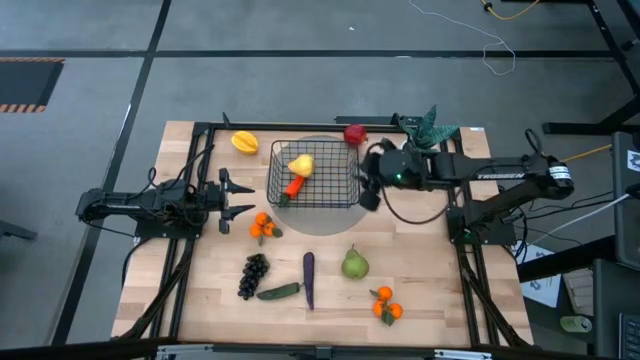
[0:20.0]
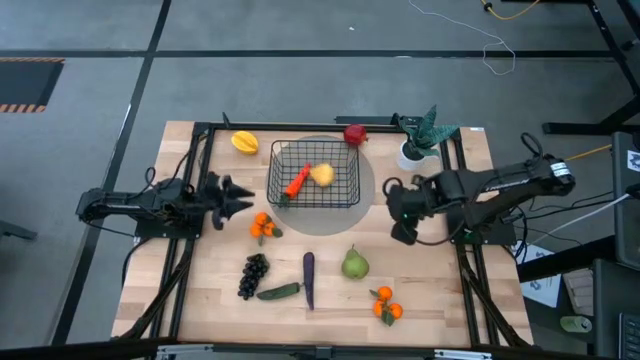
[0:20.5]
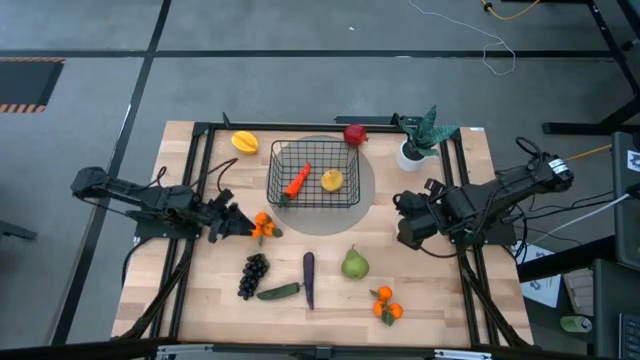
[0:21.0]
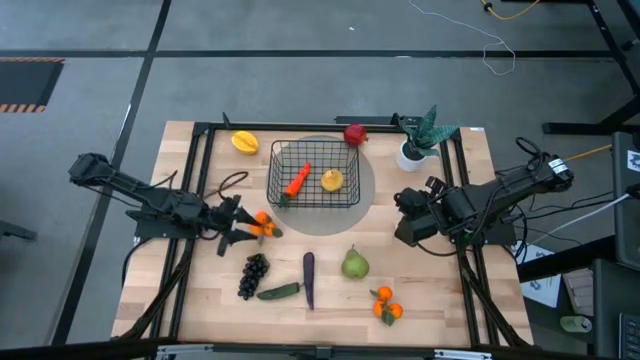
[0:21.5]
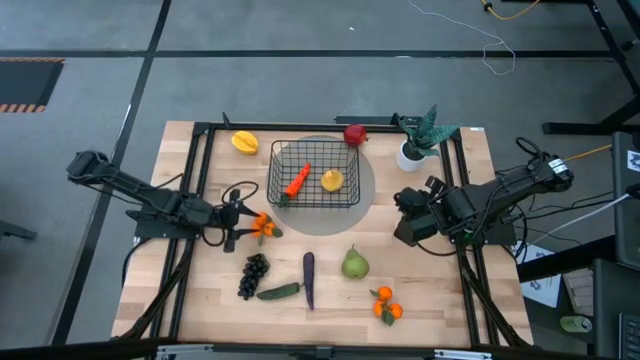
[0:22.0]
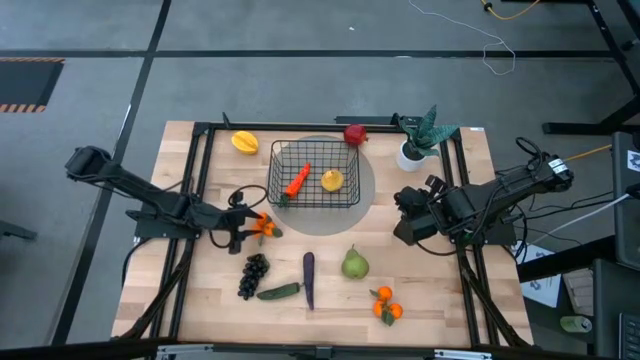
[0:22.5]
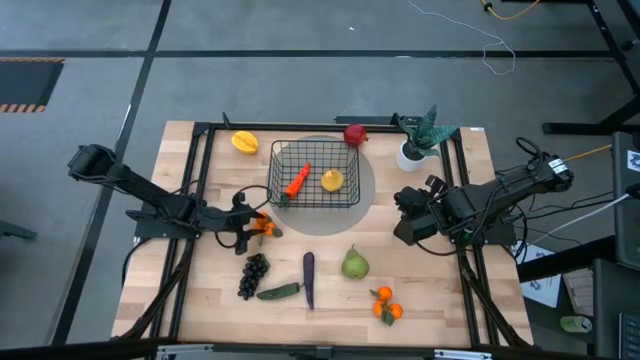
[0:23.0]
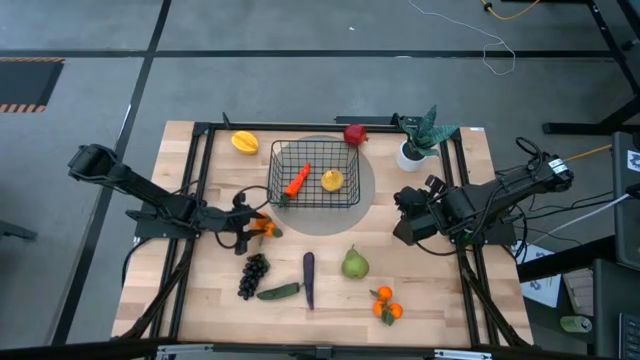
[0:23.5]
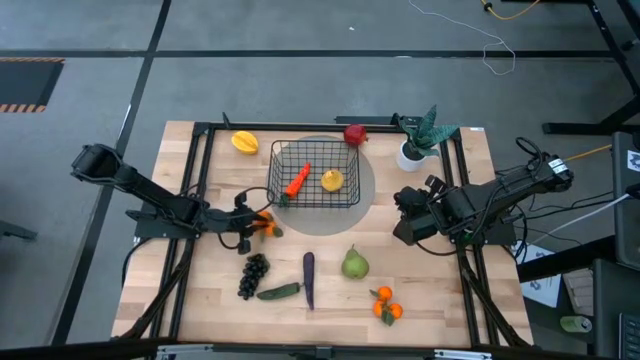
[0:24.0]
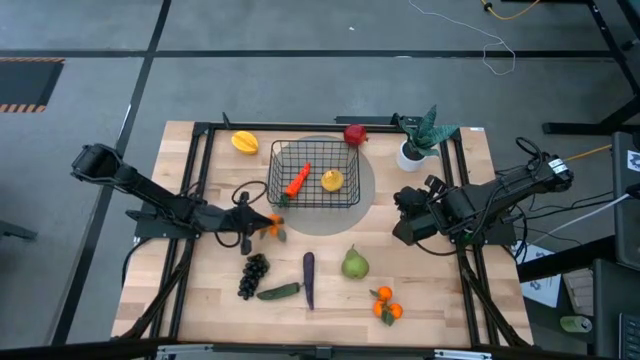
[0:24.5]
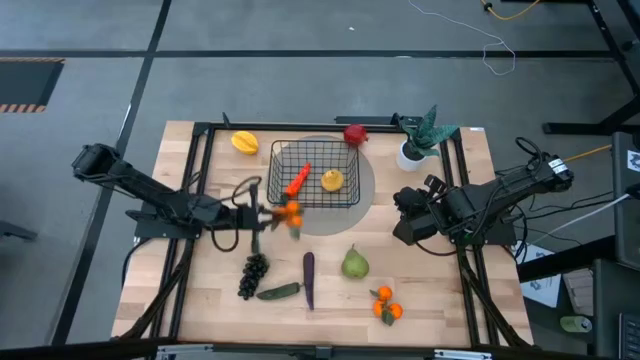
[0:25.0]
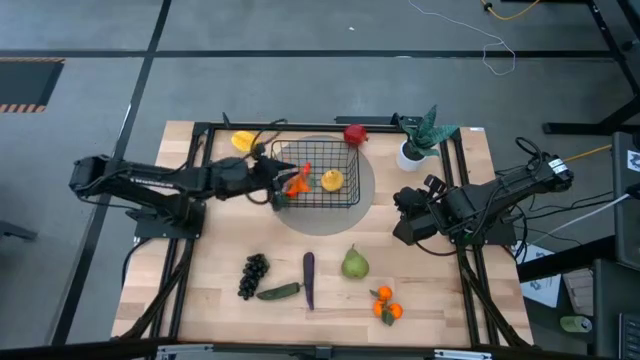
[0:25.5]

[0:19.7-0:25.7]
Task: Build produce basket
Put the orange tangerines into the wire basket

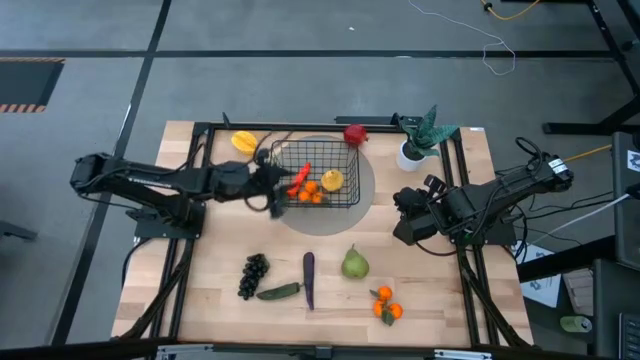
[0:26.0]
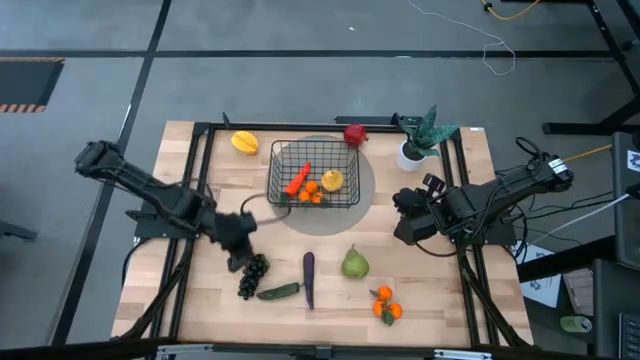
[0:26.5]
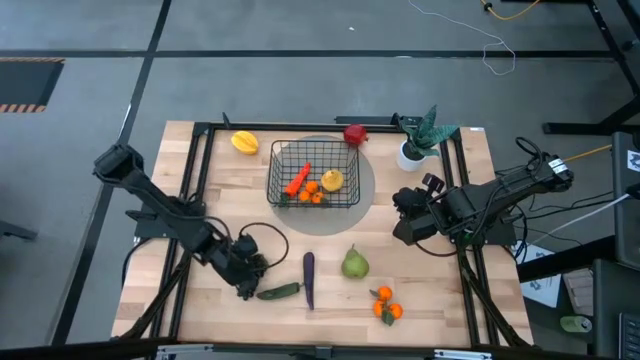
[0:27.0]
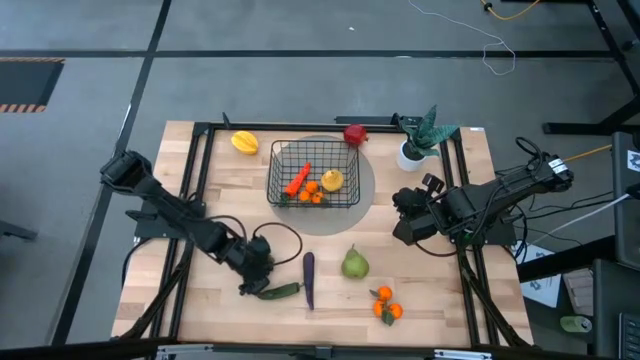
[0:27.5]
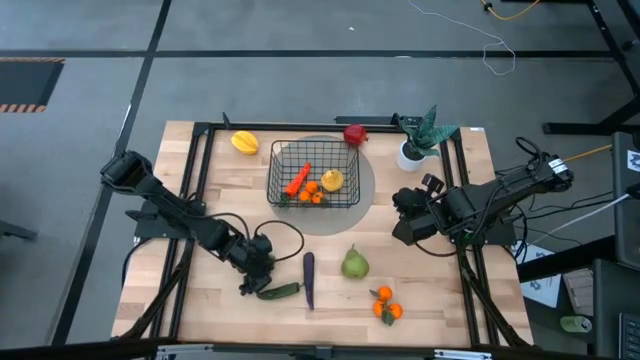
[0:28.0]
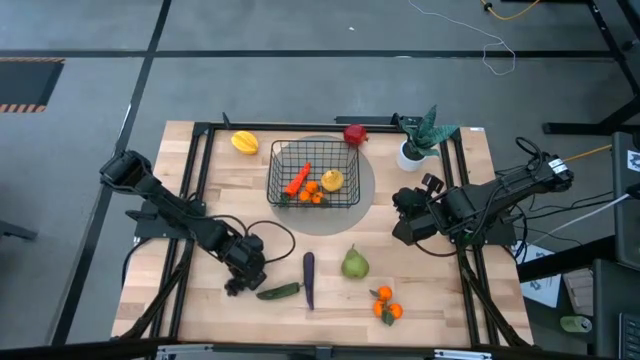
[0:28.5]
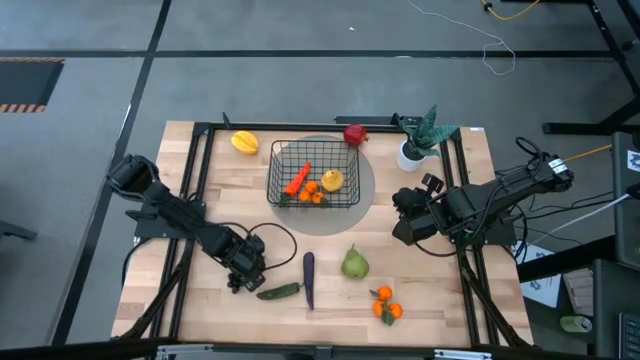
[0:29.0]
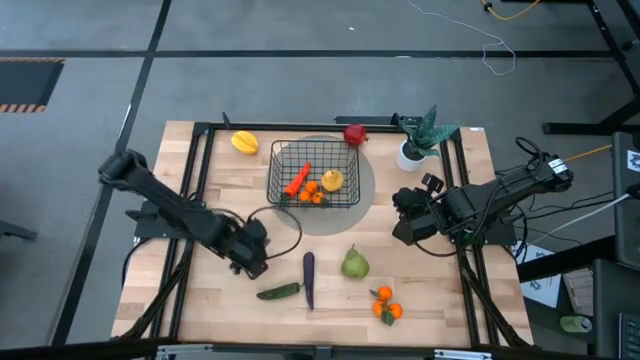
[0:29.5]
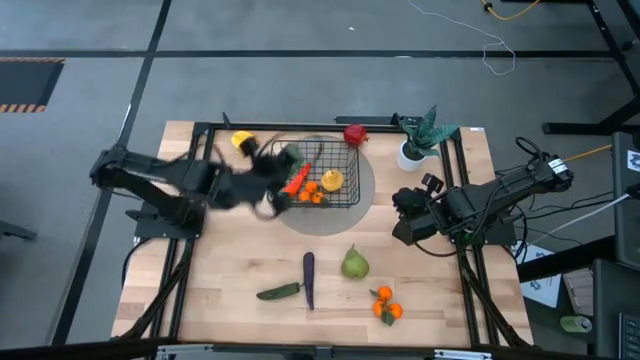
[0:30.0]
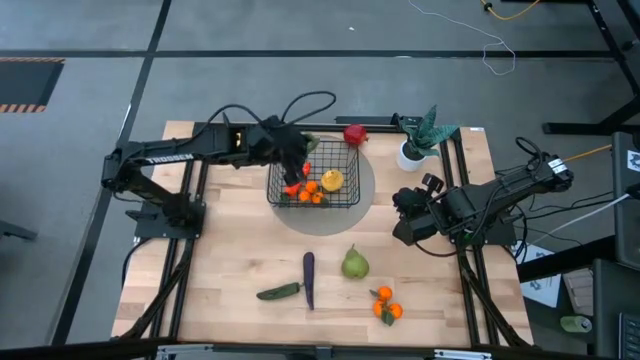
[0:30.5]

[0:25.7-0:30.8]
Put the black grapes into the wire basket

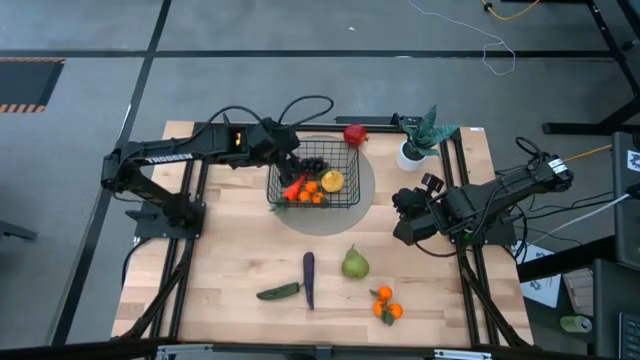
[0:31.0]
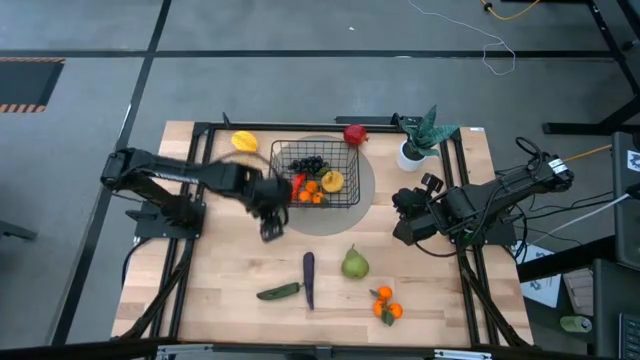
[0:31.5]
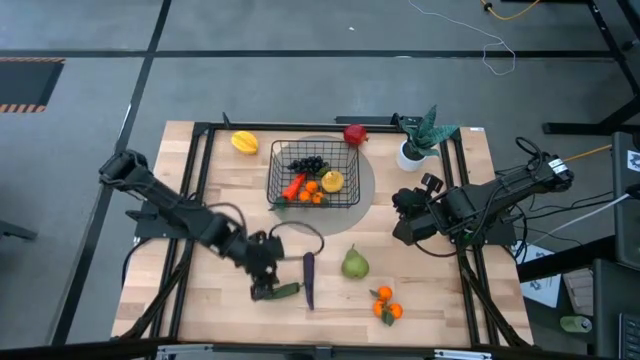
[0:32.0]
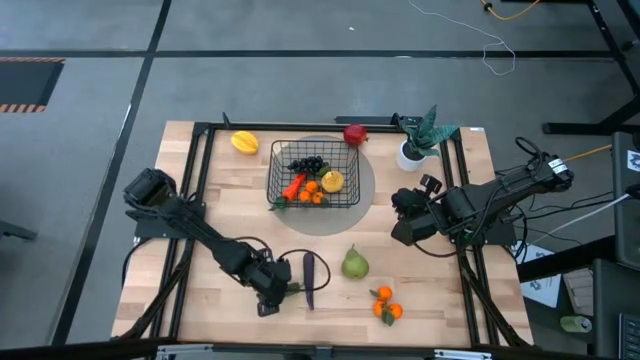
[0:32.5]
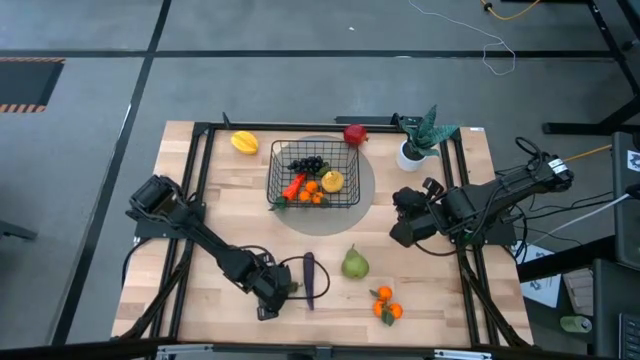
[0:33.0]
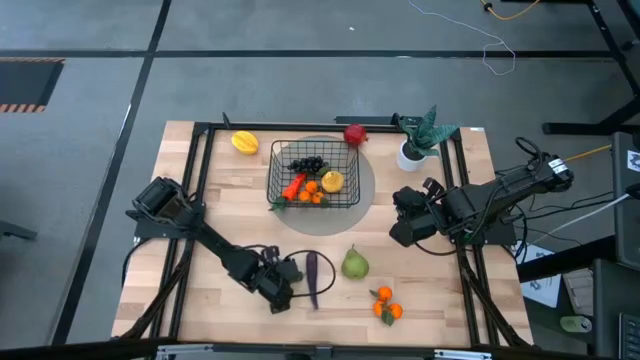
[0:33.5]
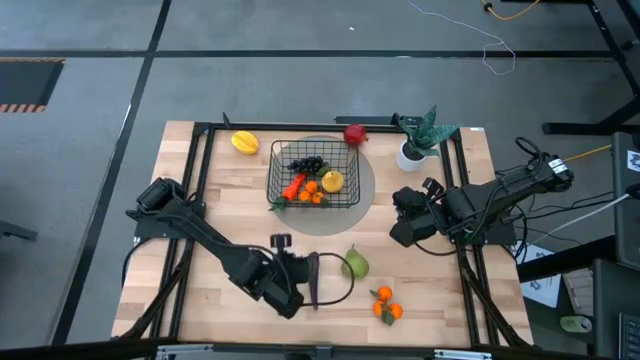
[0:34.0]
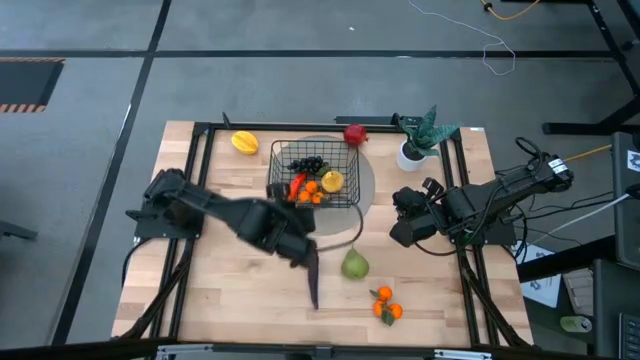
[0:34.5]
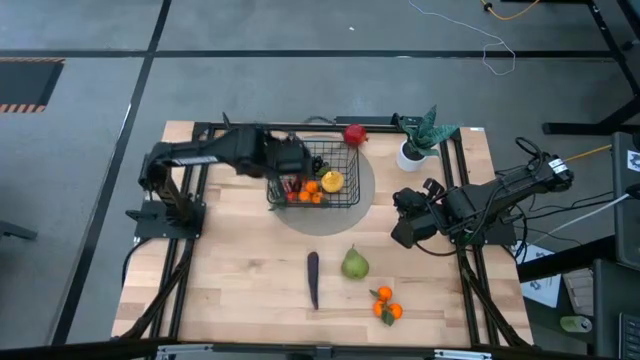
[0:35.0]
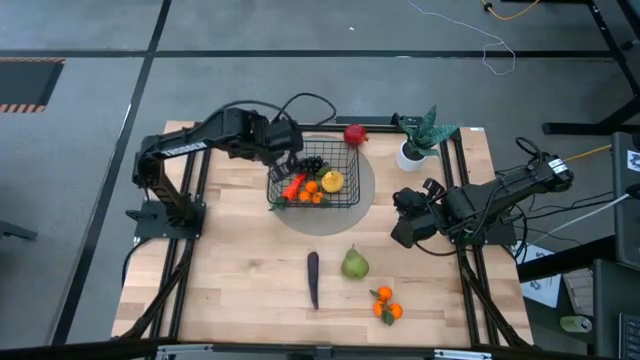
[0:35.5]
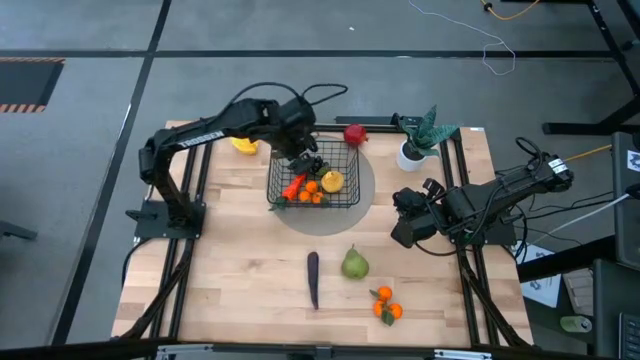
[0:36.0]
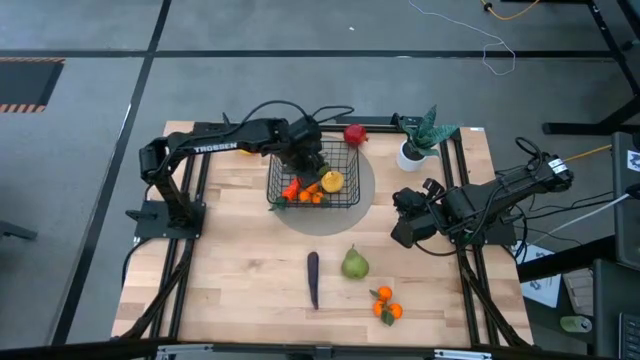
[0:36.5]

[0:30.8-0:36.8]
Put the green chili into the wire basket

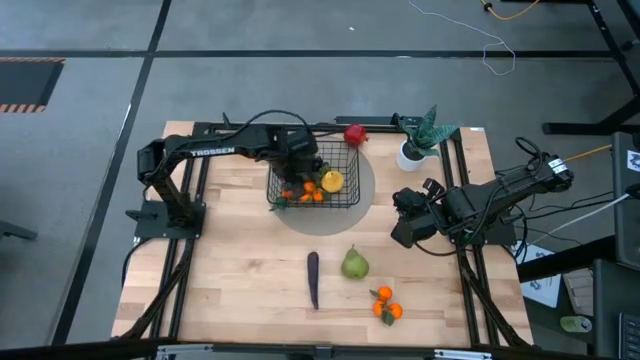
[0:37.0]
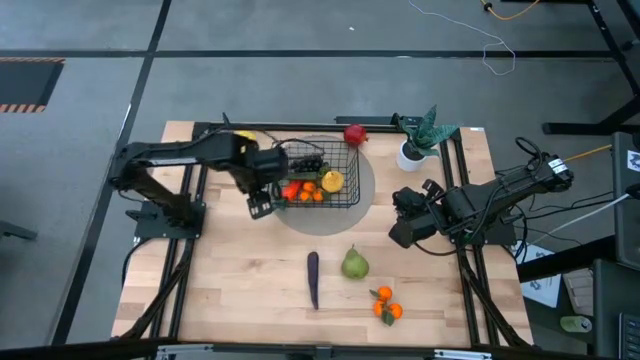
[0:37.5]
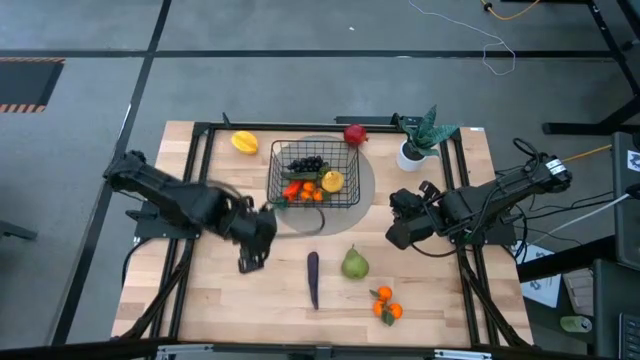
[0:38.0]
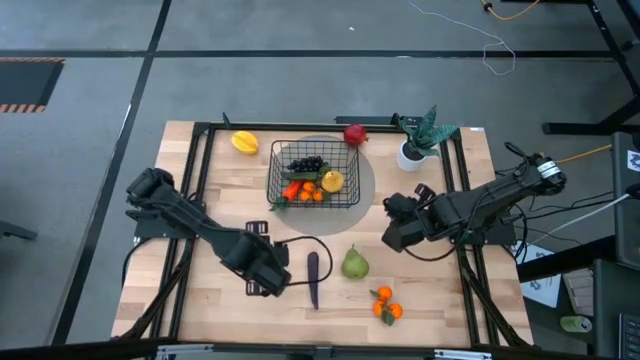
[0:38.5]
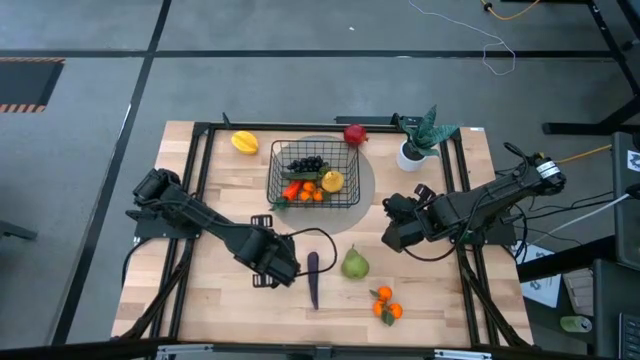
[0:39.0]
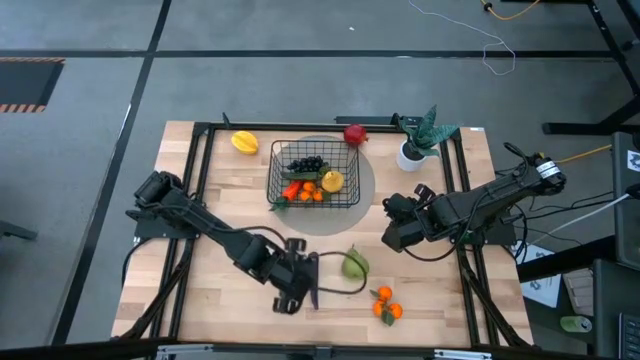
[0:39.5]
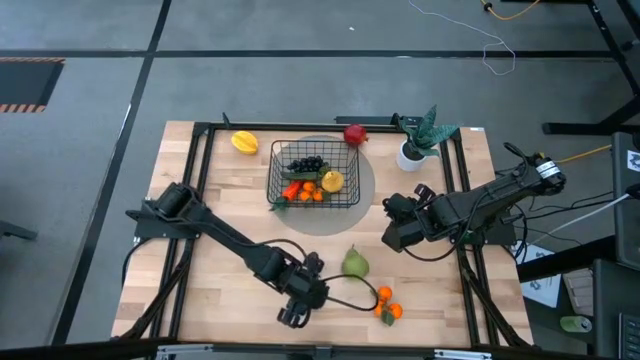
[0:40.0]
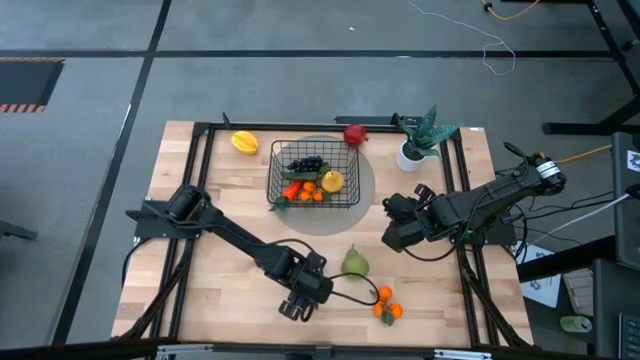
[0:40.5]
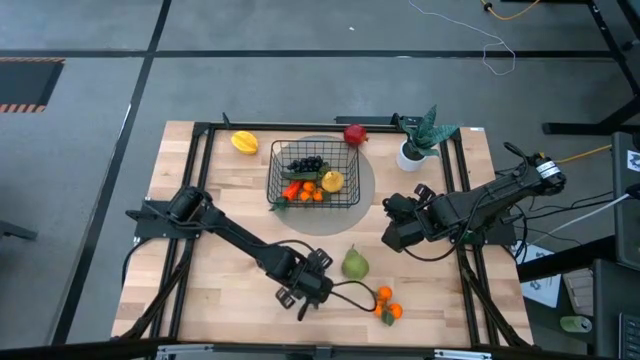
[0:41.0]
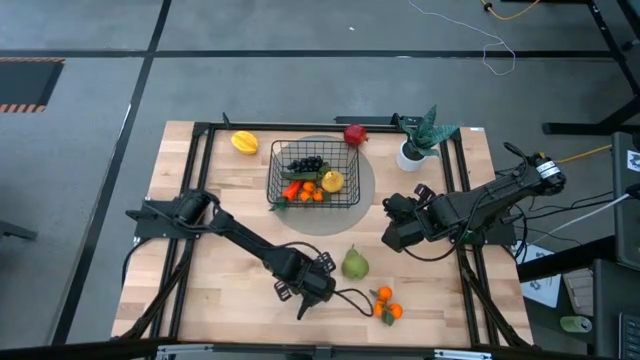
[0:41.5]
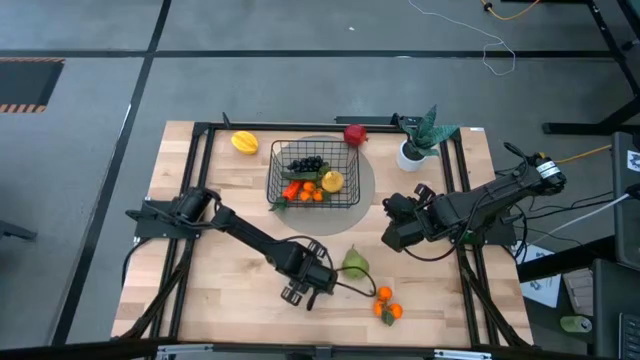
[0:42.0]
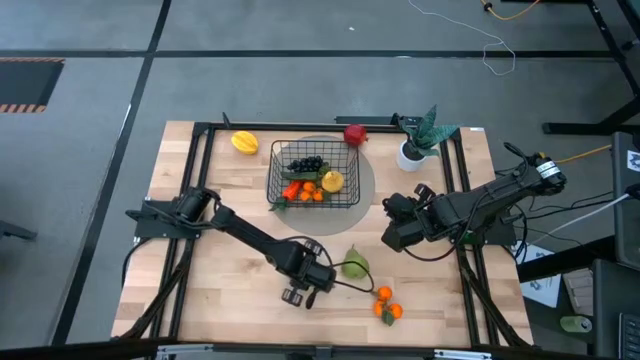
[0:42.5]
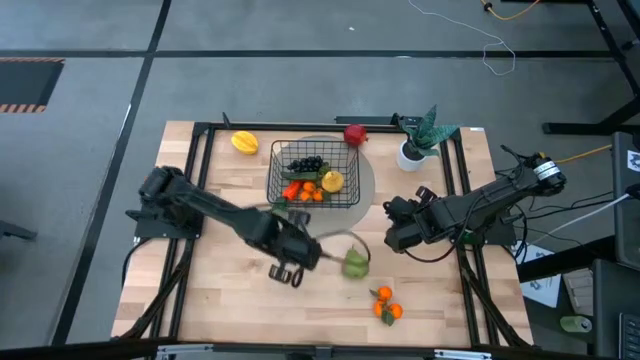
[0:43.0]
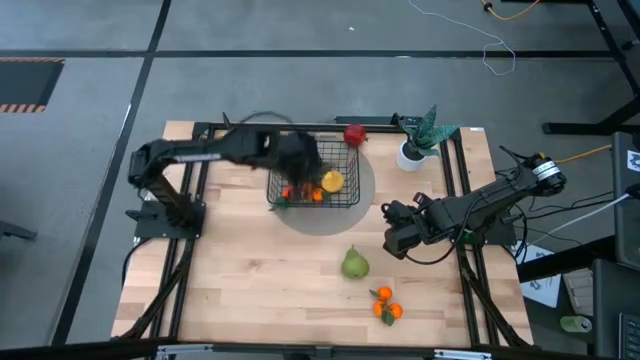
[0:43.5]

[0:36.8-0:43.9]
Put the violet eggplant into the wire basket
